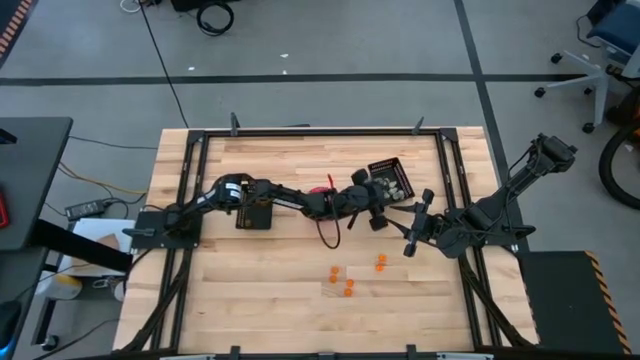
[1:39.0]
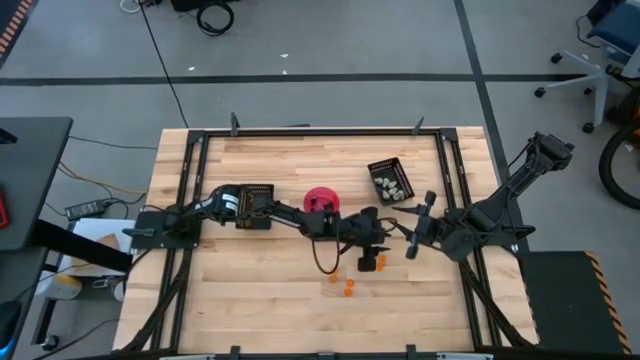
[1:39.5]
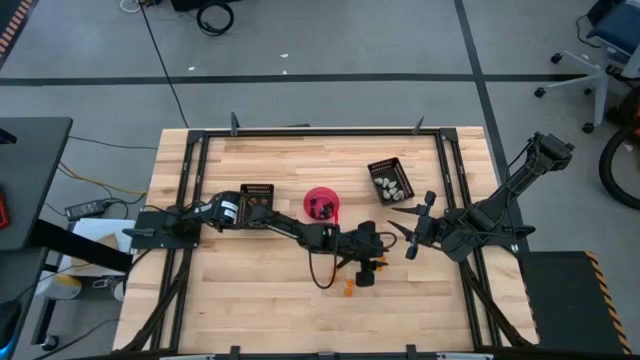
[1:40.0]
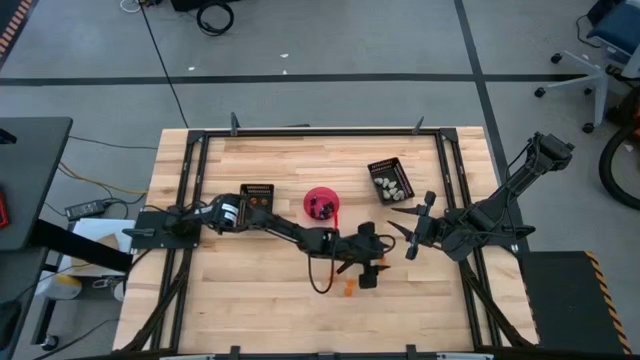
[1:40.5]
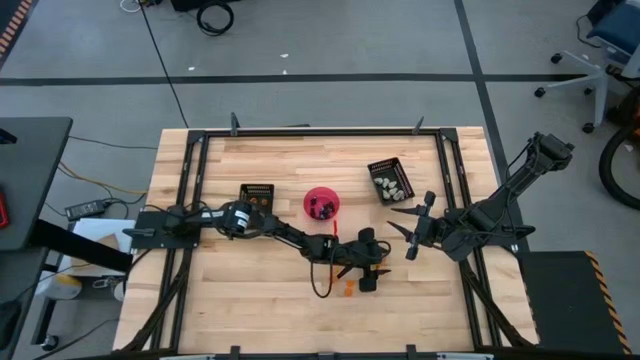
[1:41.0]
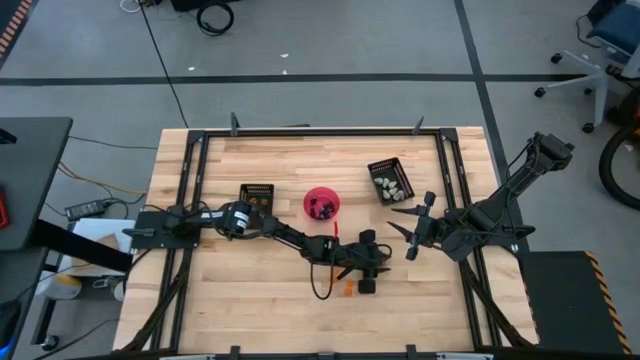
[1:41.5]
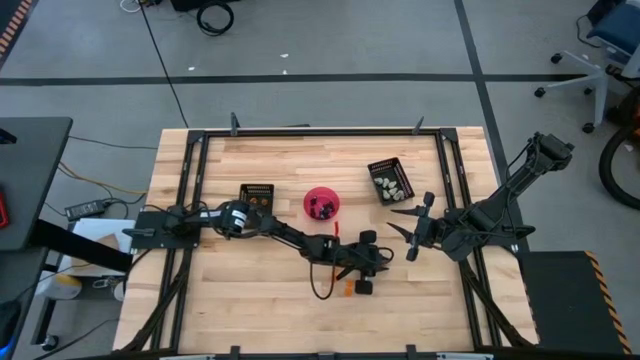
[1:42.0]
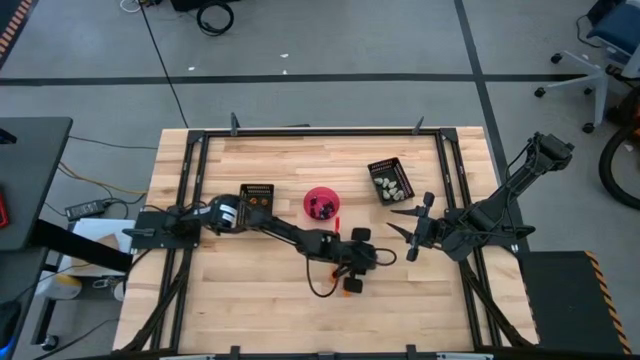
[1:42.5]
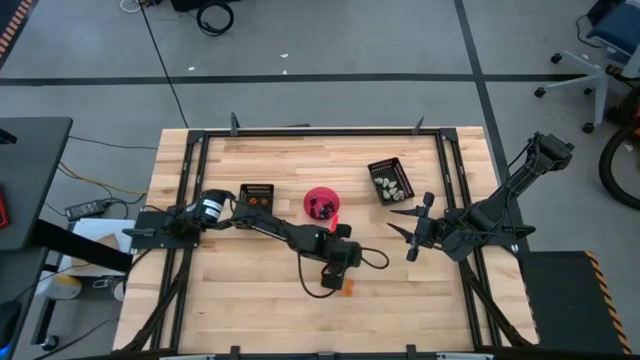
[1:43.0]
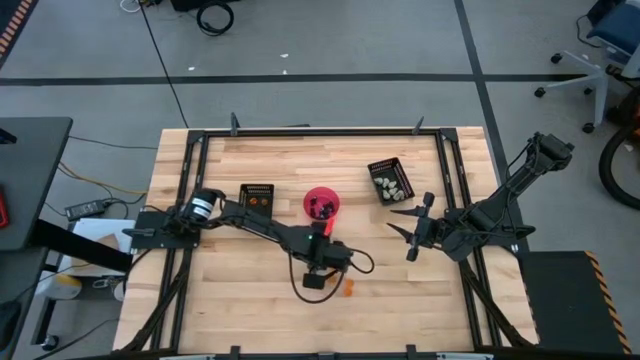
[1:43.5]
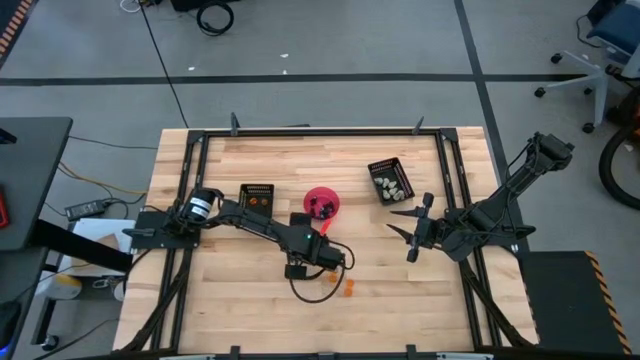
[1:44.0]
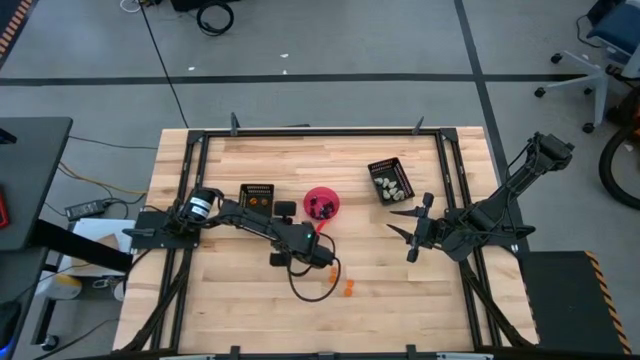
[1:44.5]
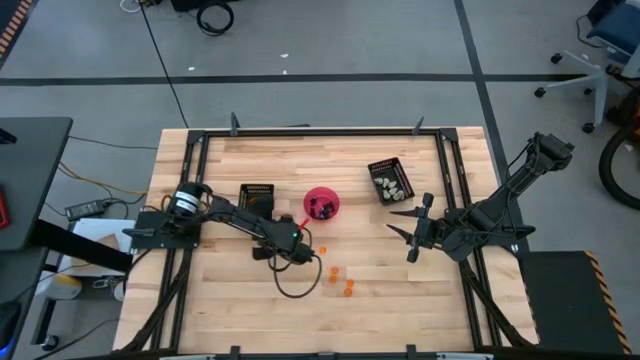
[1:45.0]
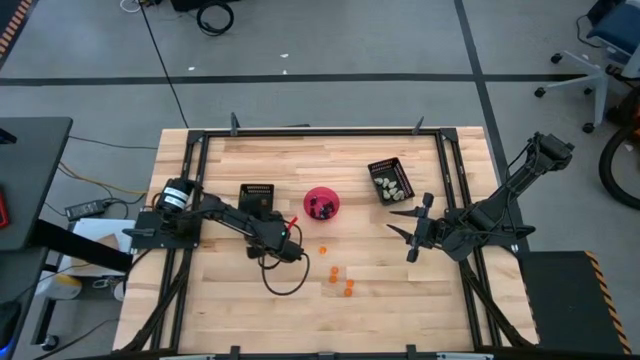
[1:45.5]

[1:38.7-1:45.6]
Task: Sort Halloween decoration
Put the orange pumpkin toy into the left black bin

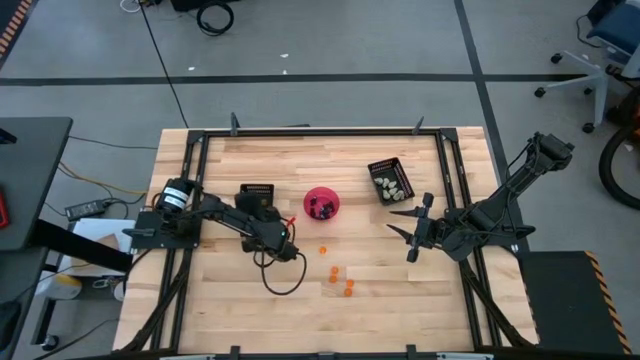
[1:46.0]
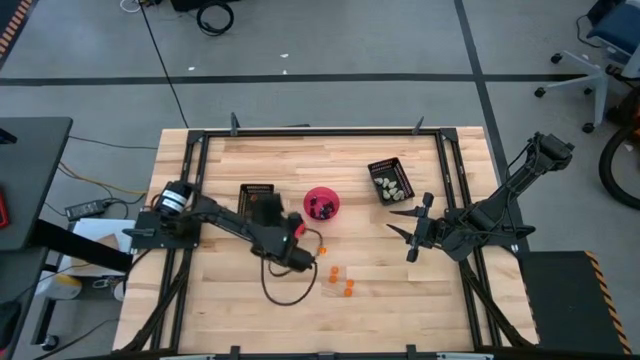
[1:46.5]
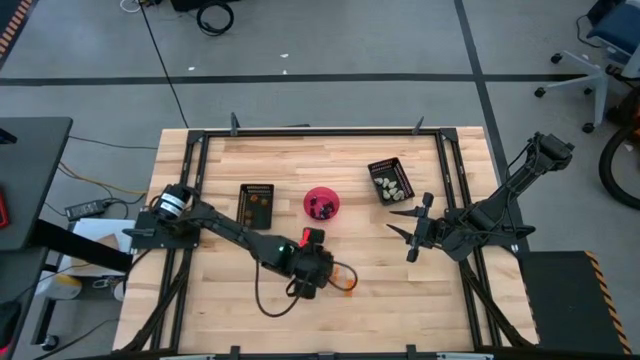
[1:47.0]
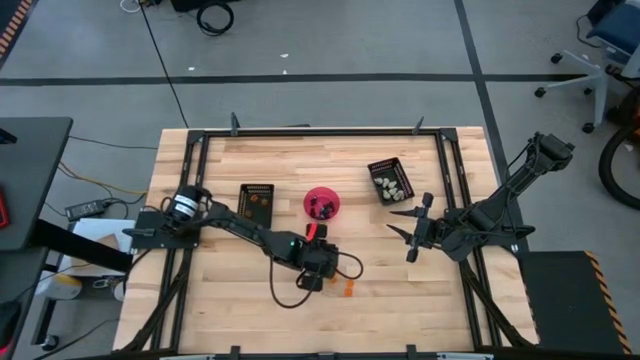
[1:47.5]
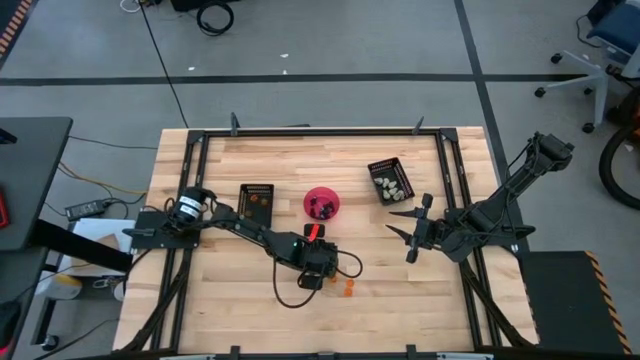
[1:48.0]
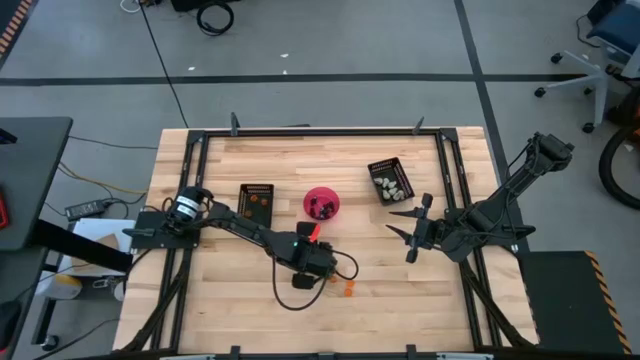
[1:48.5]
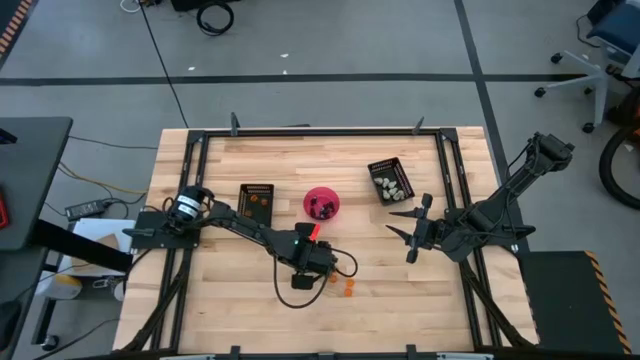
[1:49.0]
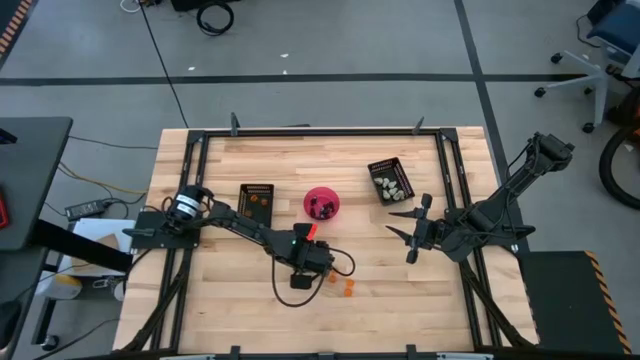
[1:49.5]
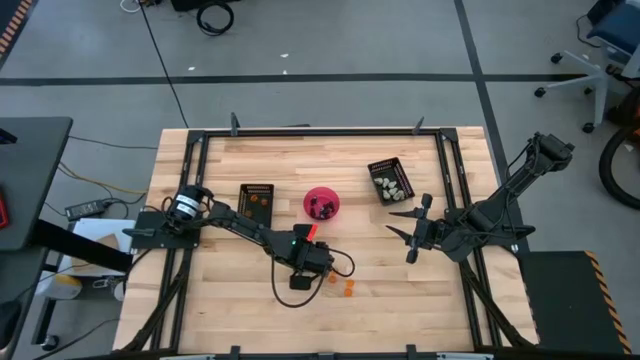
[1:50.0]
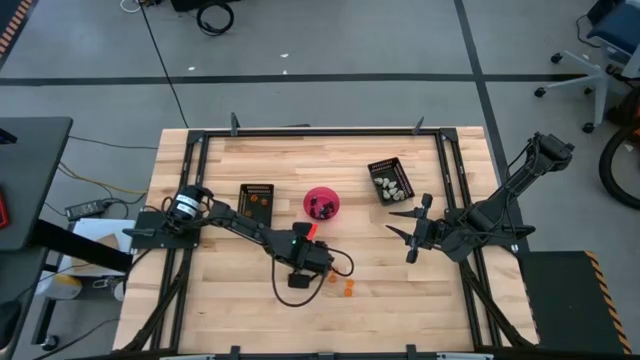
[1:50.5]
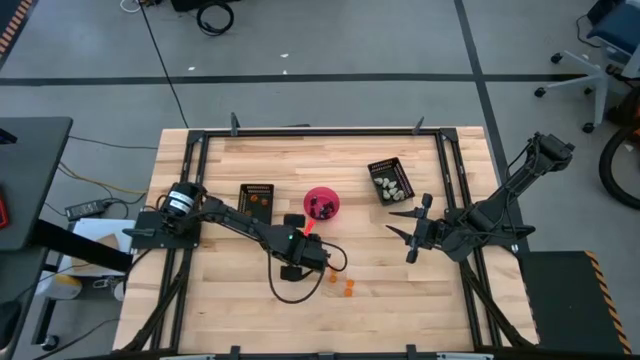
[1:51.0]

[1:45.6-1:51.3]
Put the orange pumpkin toy into the left black bin

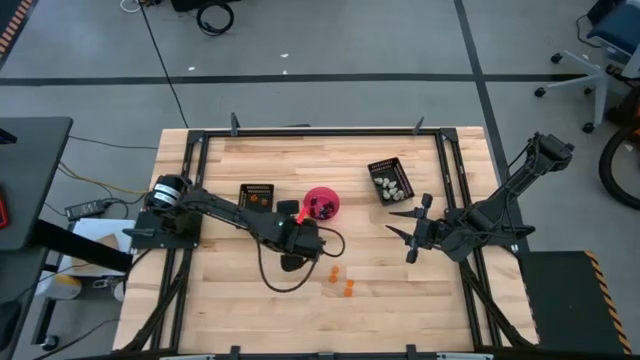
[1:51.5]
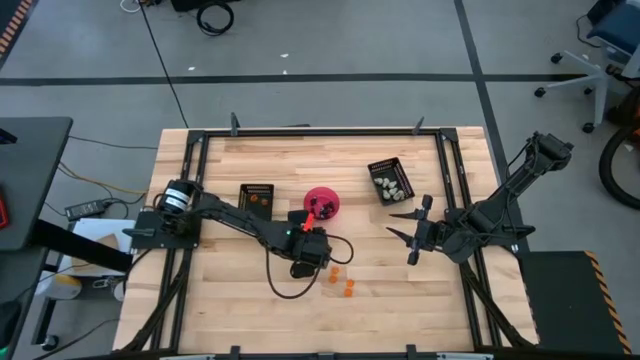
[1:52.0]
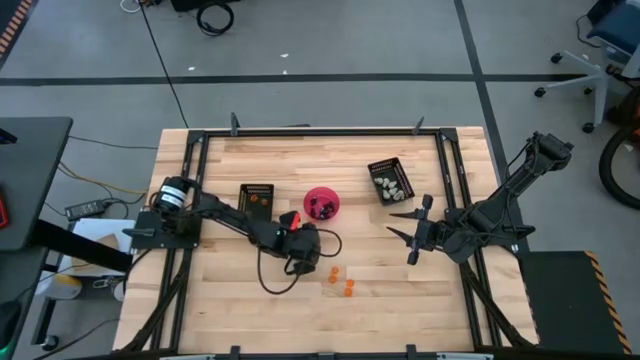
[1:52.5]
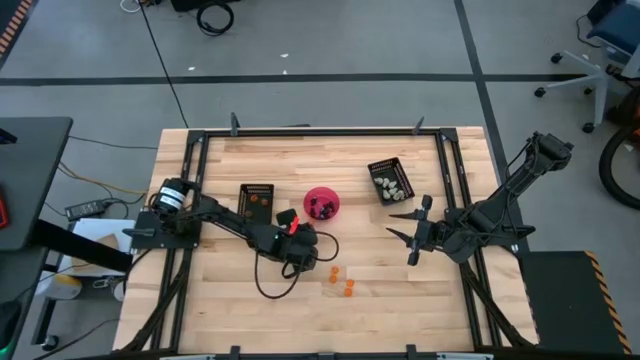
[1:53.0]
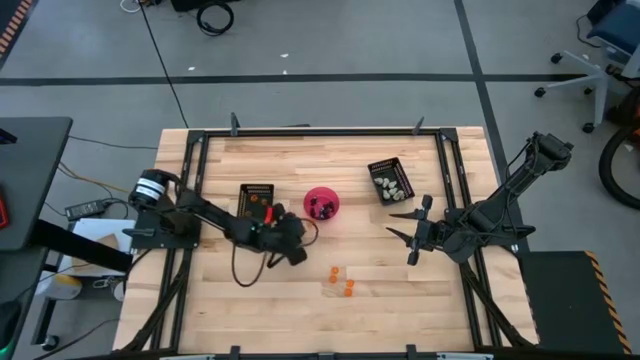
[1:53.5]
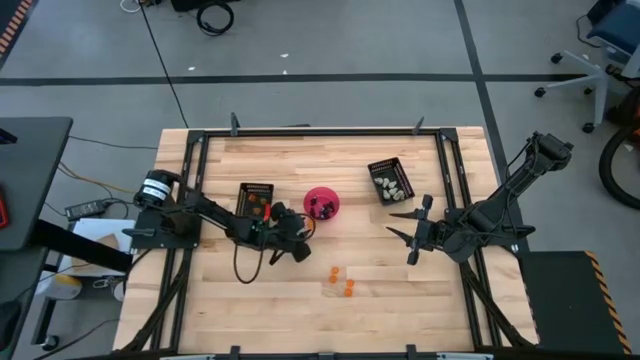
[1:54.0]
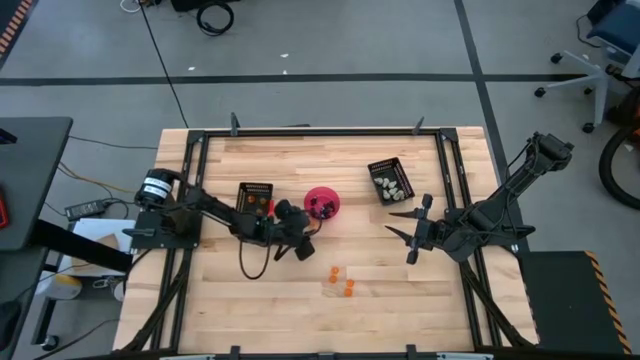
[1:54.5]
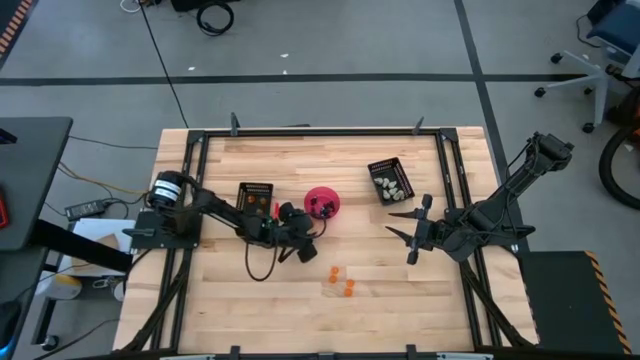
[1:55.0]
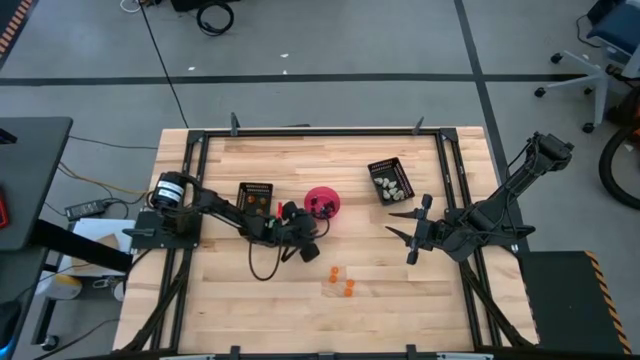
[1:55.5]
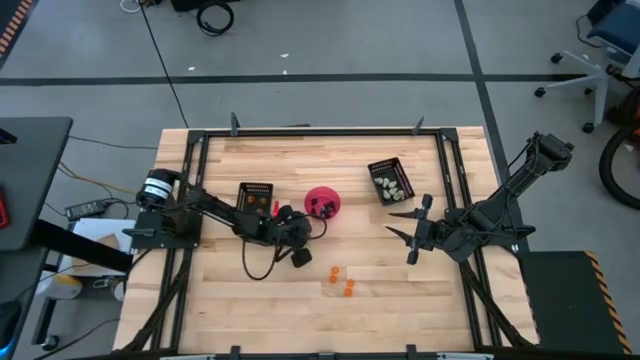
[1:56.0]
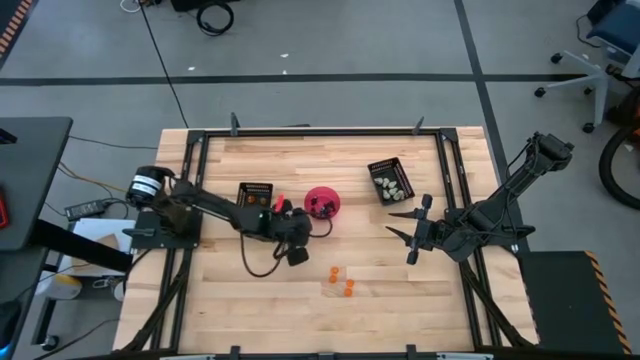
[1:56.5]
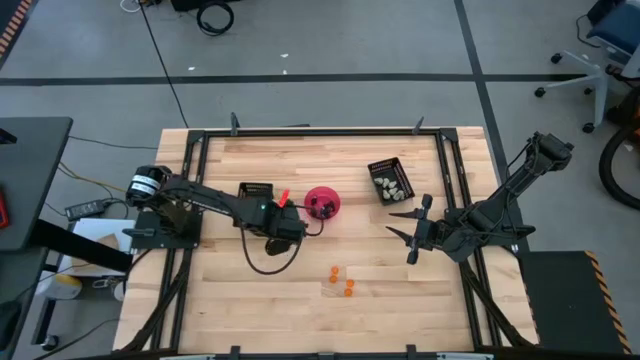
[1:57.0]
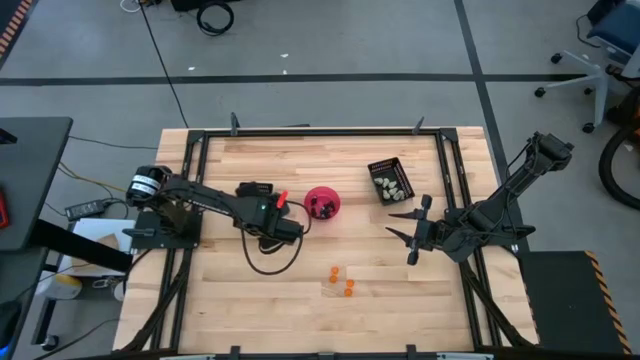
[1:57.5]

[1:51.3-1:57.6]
Put the orange pumpkin toy into the left black bin

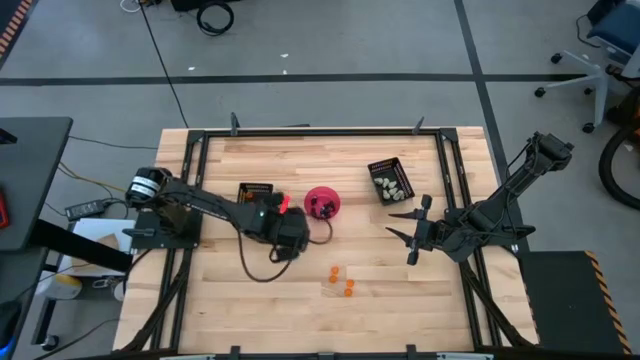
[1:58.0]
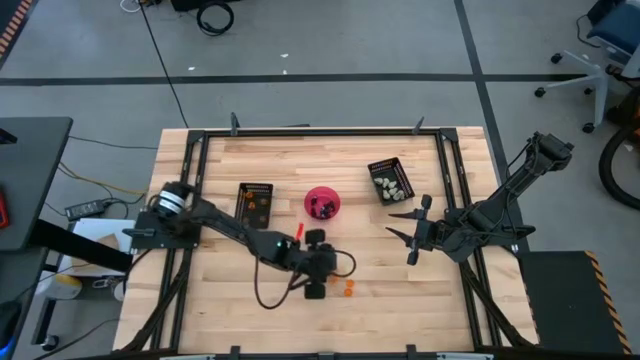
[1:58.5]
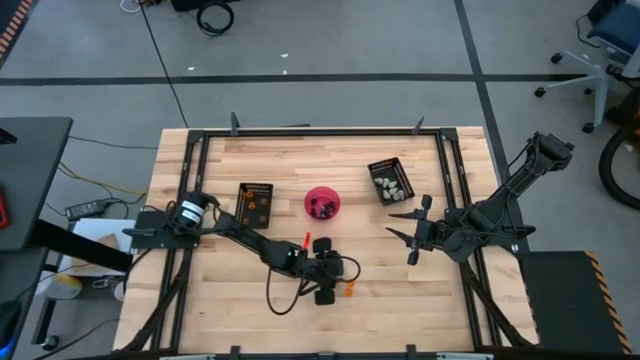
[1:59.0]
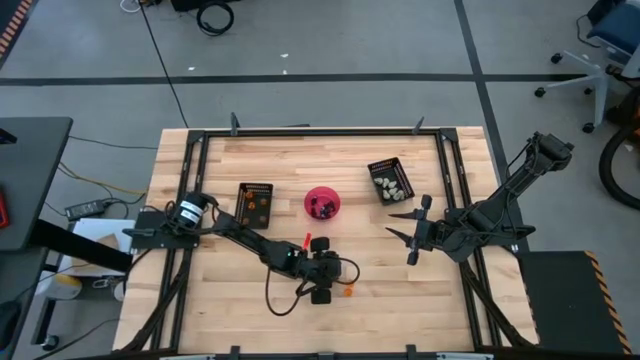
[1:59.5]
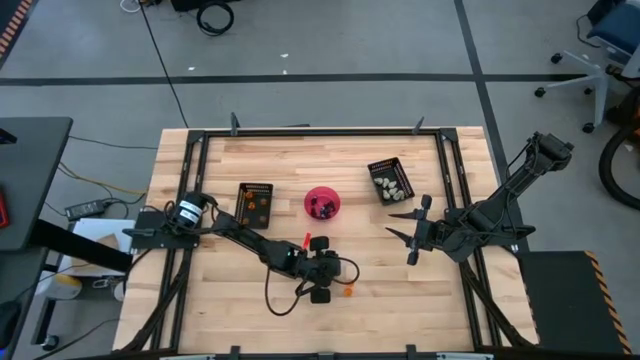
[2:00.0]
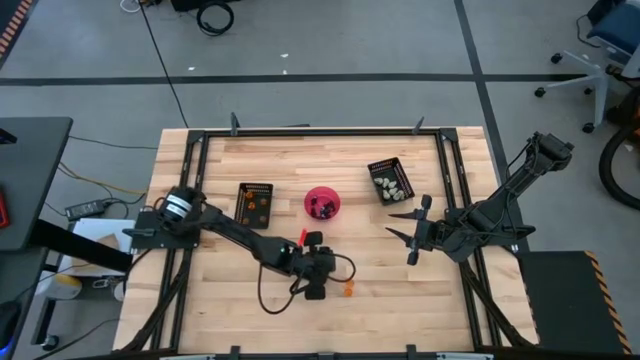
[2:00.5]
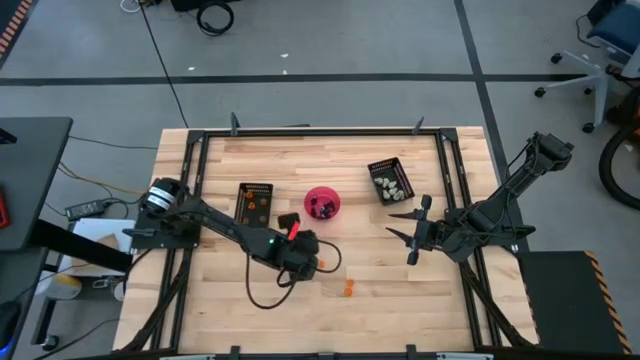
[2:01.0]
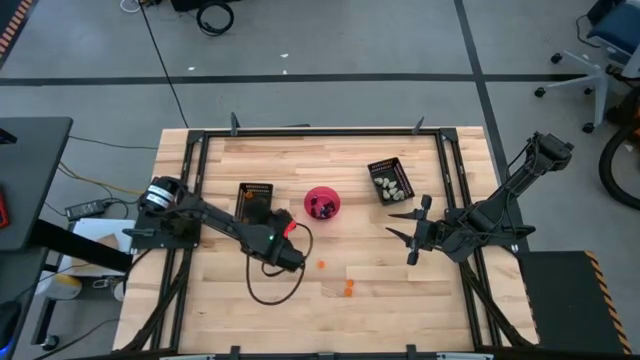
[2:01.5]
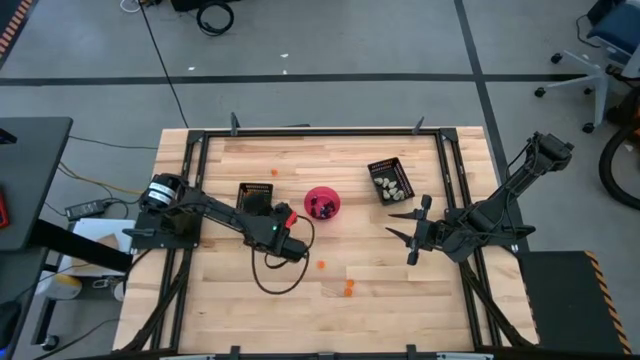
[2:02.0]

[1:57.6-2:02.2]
Put the orange pumpkin toy into the left black bin
